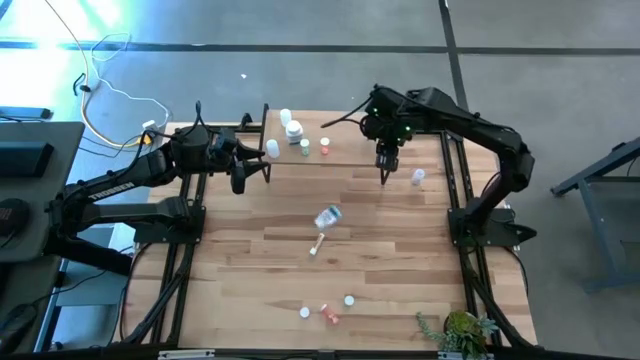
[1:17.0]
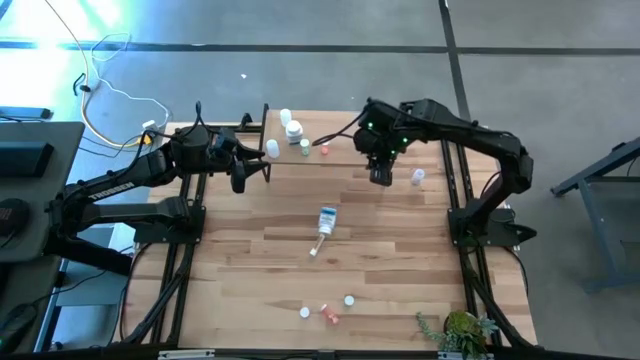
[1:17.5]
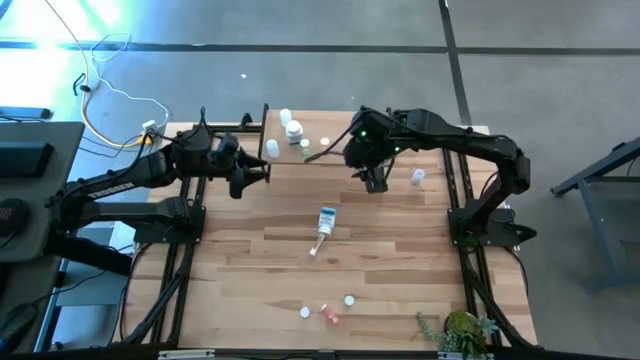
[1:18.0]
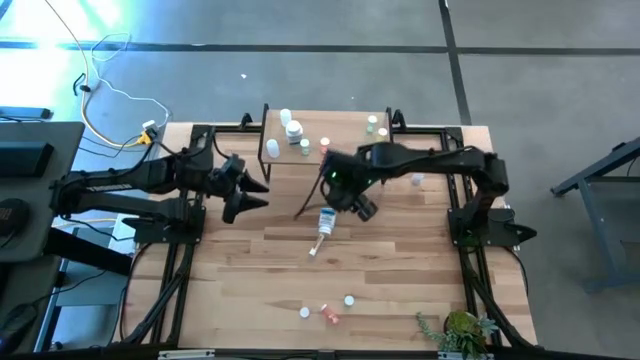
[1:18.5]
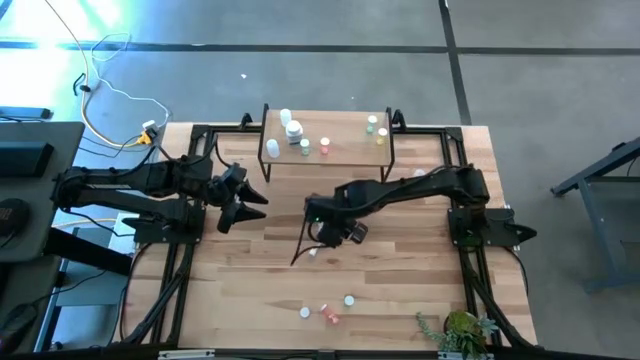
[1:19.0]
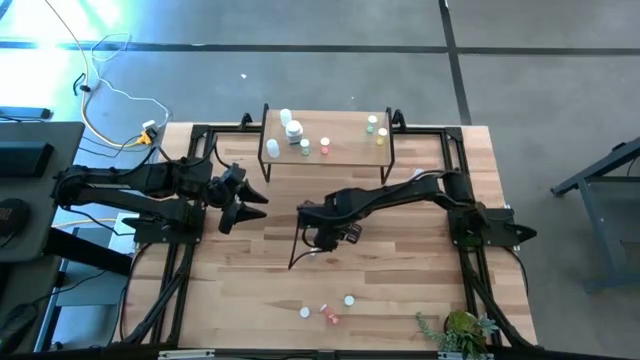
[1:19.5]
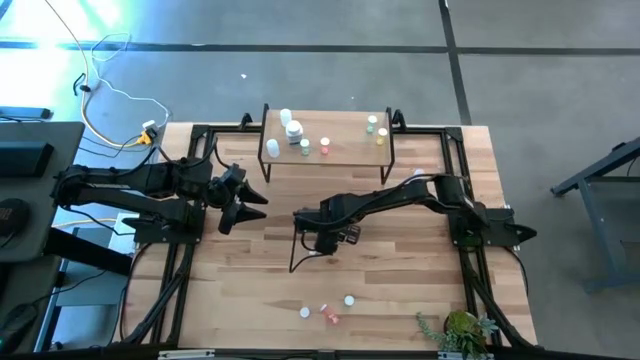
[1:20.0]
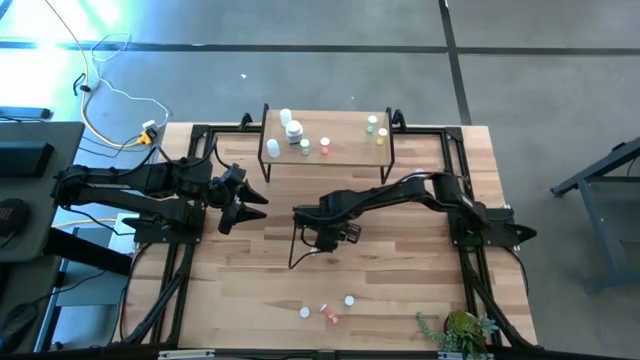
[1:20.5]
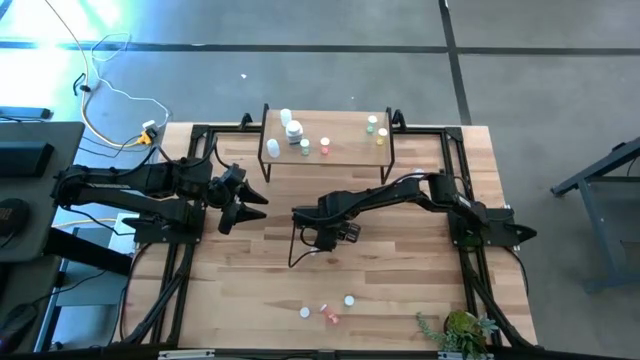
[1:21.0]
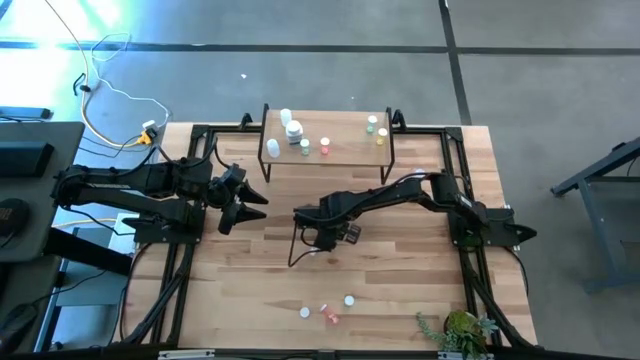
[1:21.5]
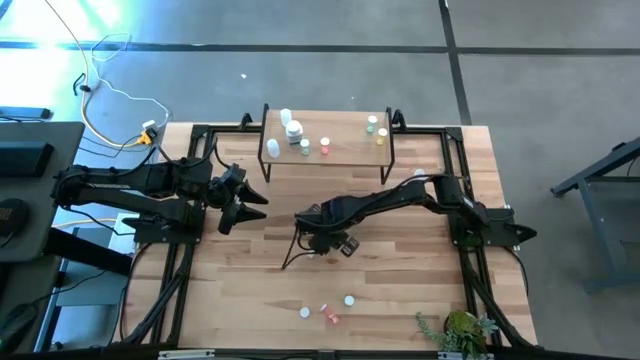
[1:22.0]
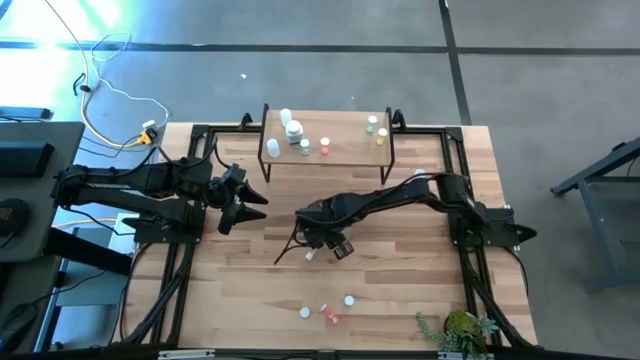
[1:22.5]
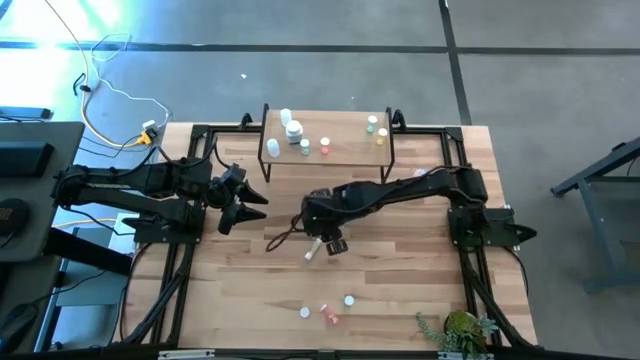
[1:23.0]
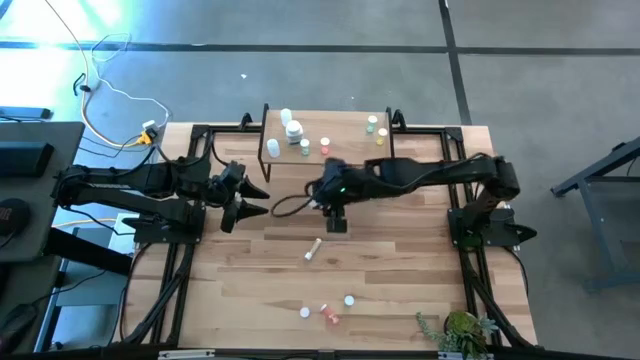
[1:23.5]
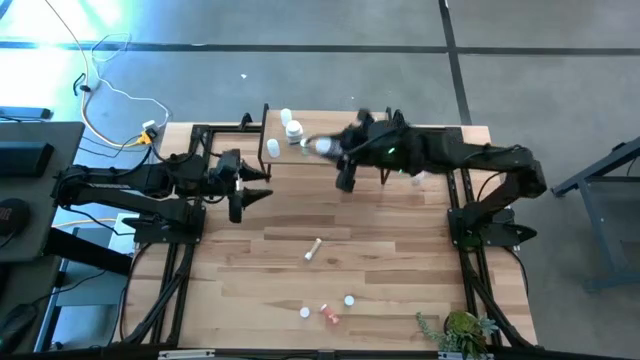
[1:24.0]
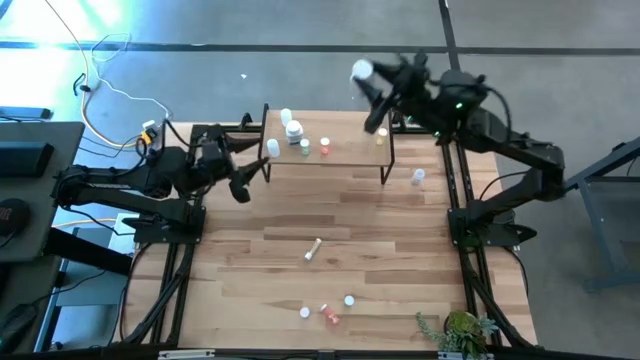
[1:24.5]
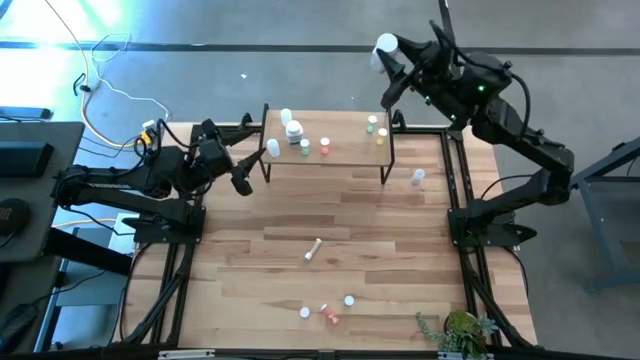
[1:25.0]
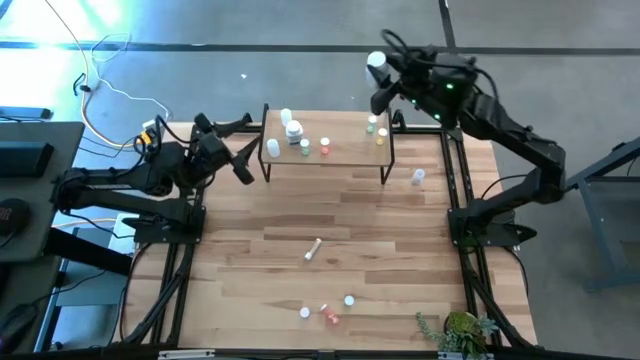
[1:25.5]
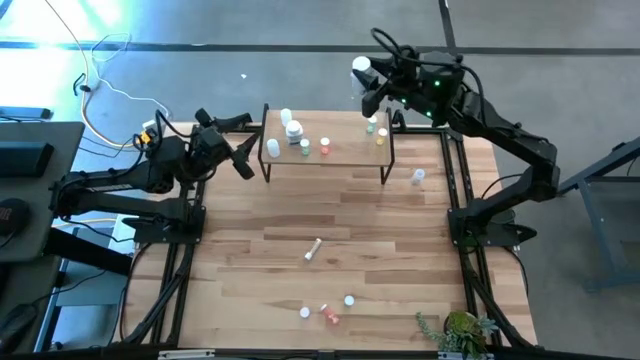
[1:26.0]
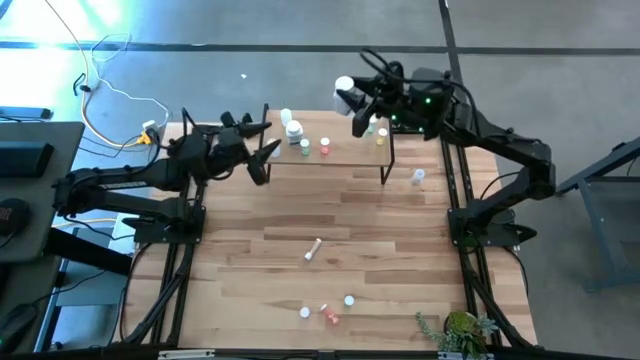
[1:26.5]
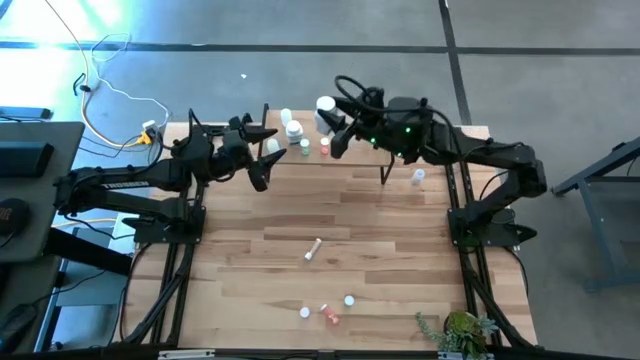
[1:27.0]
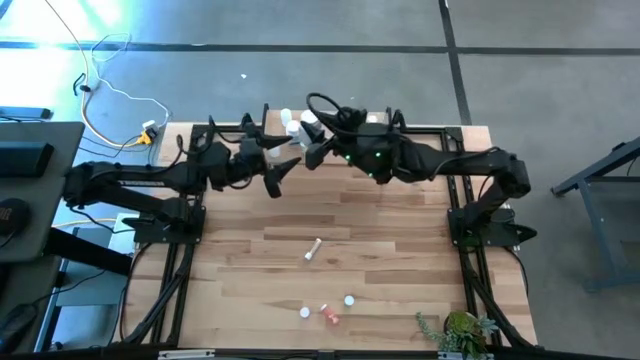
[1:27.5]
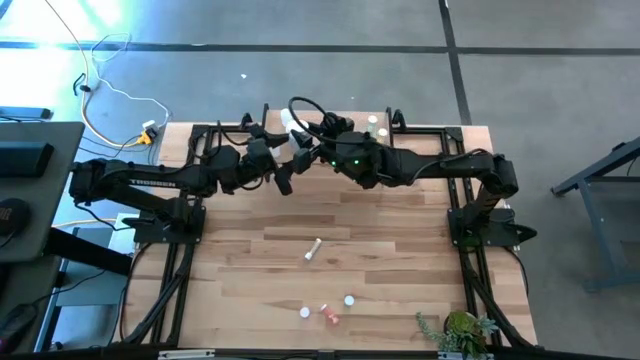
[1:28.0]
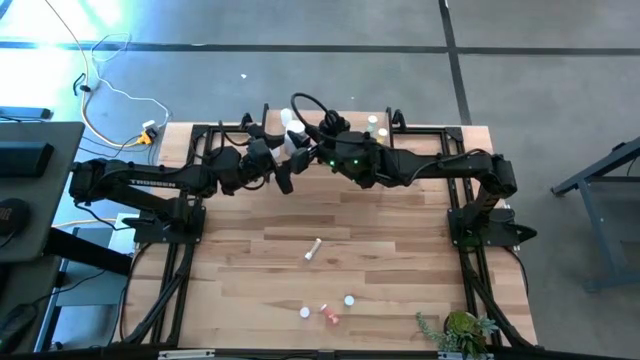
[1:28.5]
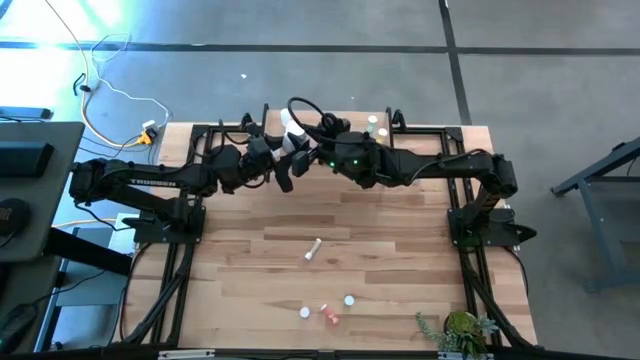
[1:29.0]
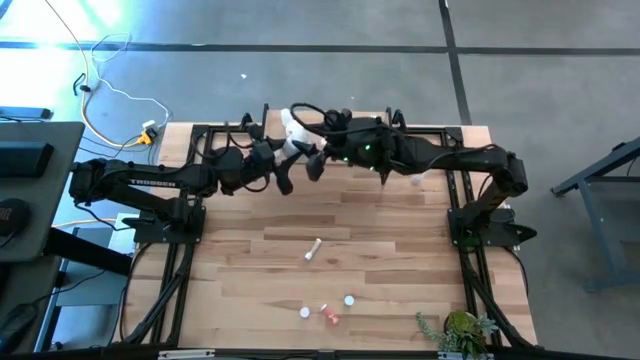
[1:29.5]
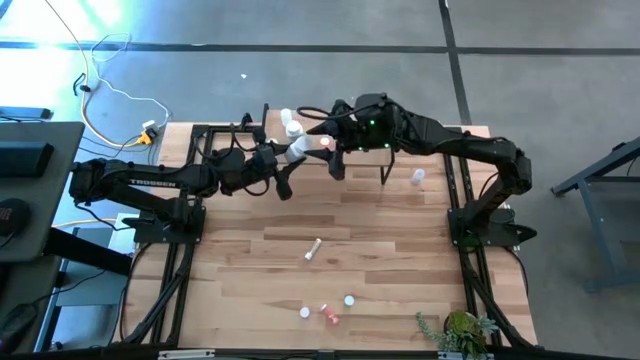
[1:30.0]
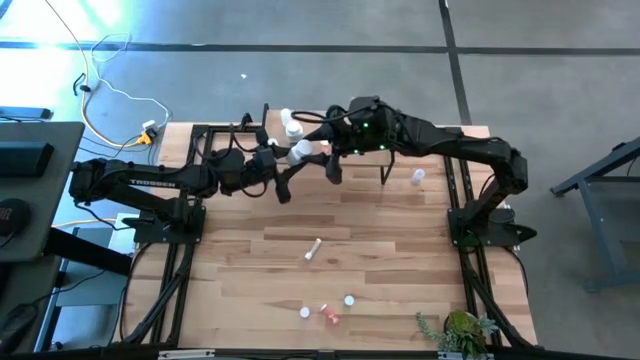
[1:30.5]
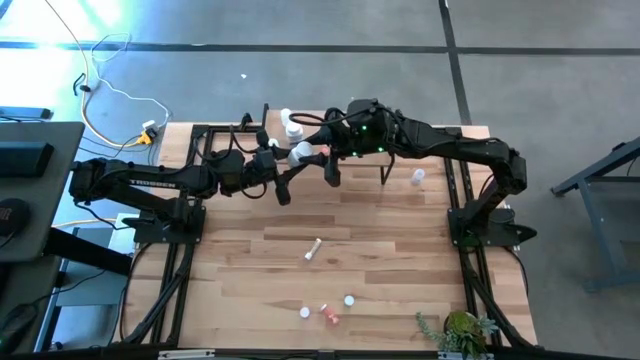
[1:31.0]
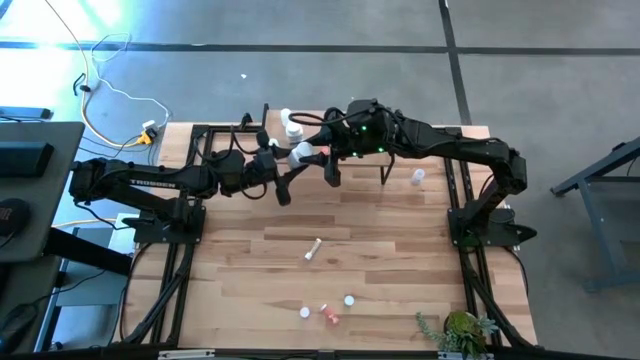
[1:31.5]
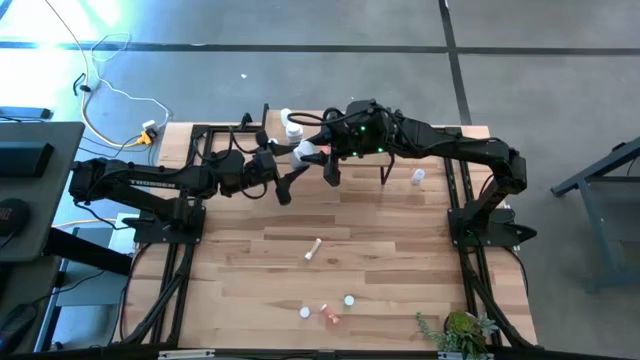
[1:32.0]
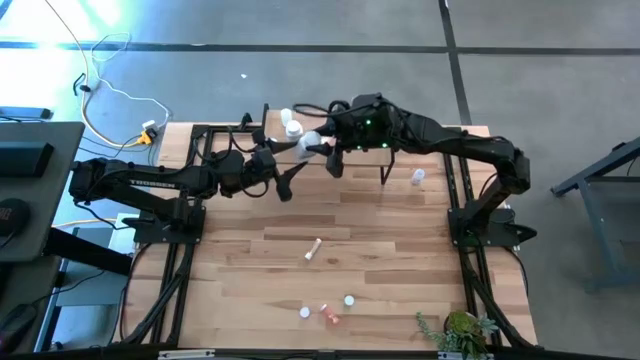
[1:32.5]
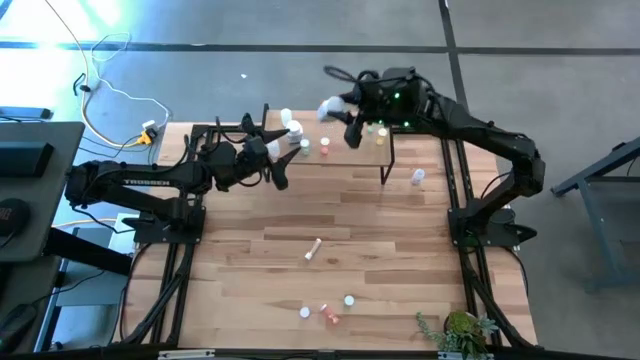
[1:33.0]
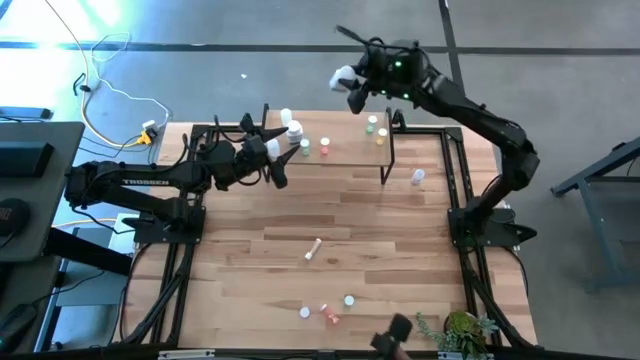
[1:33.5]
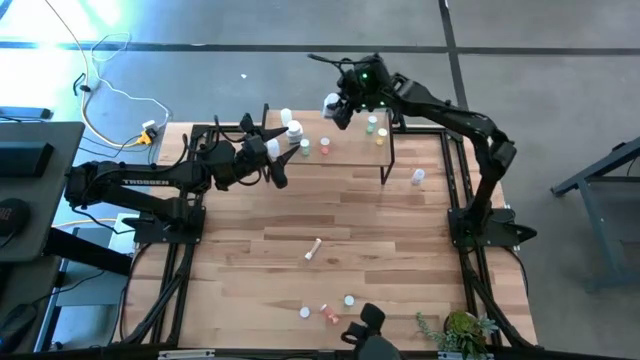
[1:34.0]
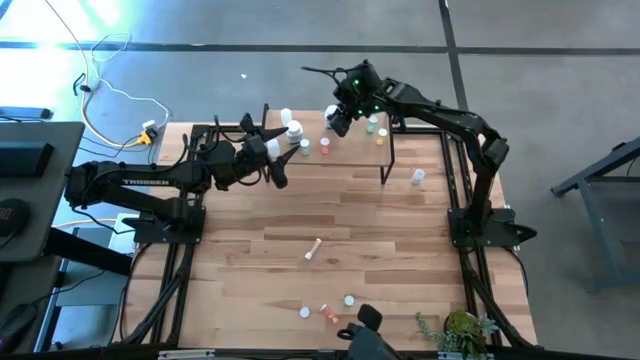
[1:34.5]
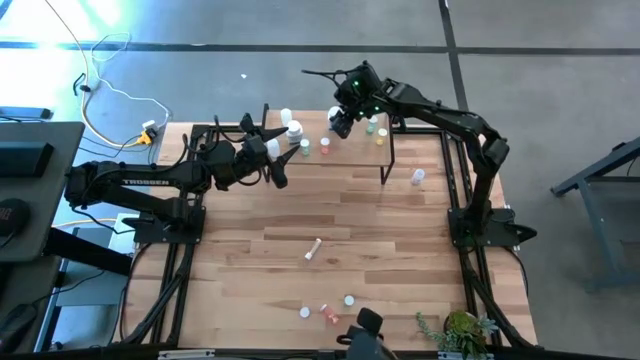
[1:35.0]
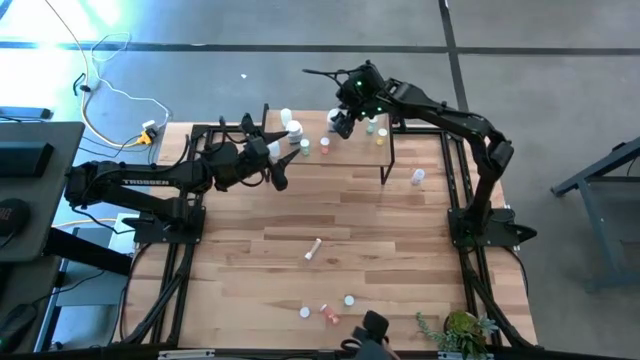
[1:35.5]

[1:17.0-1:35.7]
Task: Pick and place medicine bottles onto shelf by color
Put the large white pill bottle on the shelf
